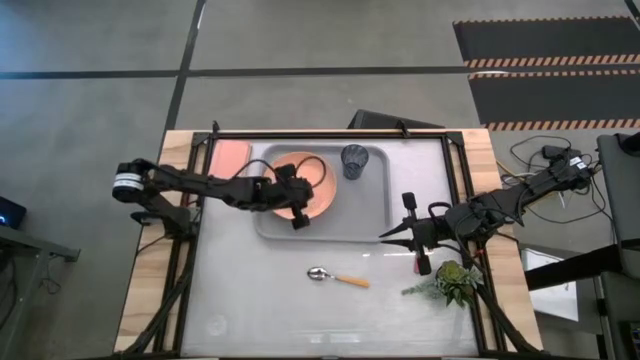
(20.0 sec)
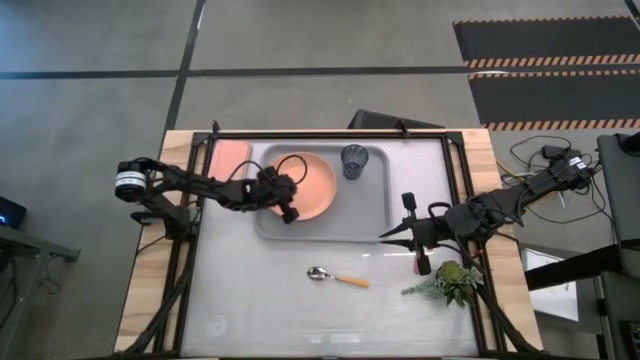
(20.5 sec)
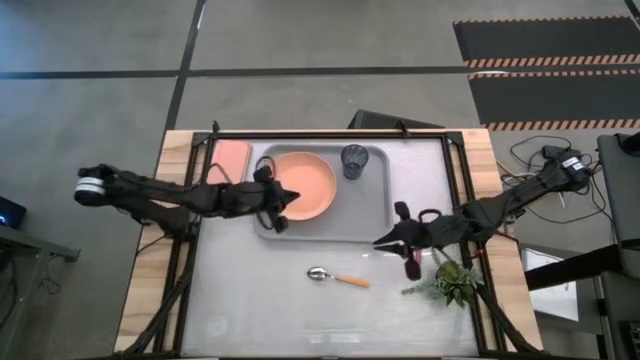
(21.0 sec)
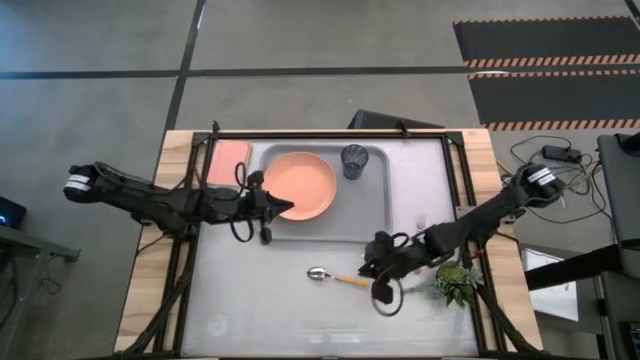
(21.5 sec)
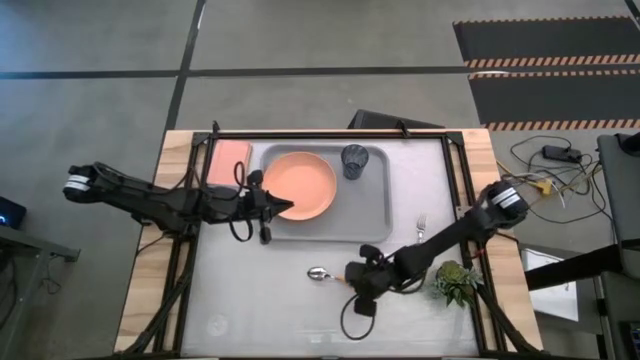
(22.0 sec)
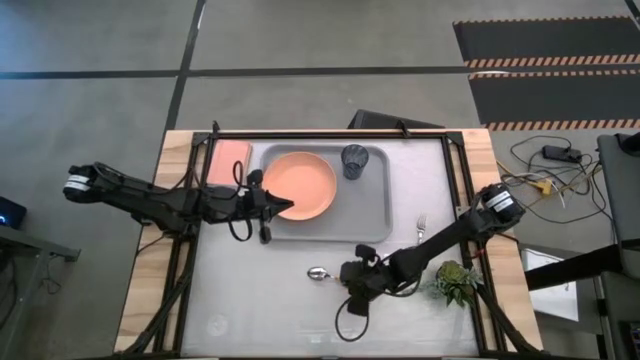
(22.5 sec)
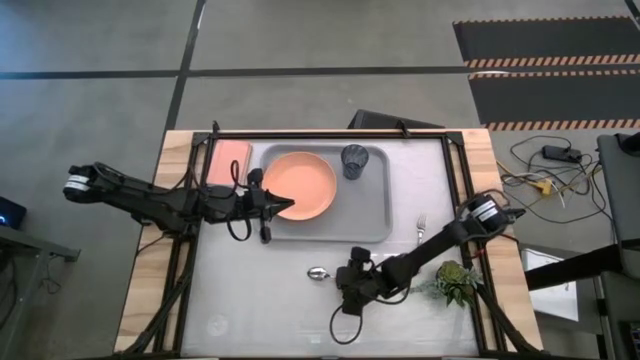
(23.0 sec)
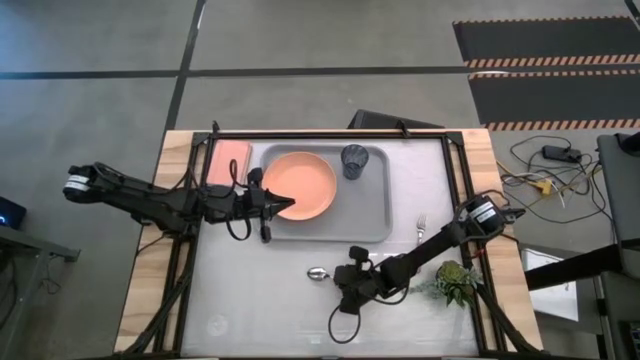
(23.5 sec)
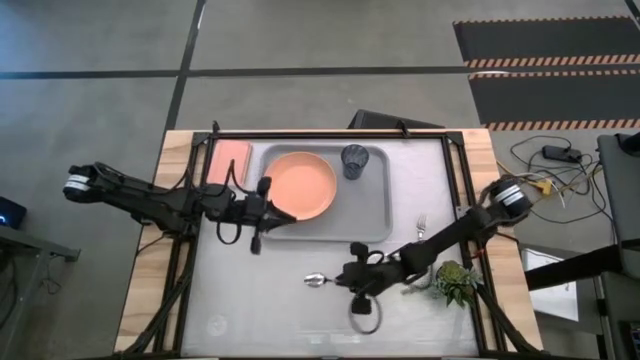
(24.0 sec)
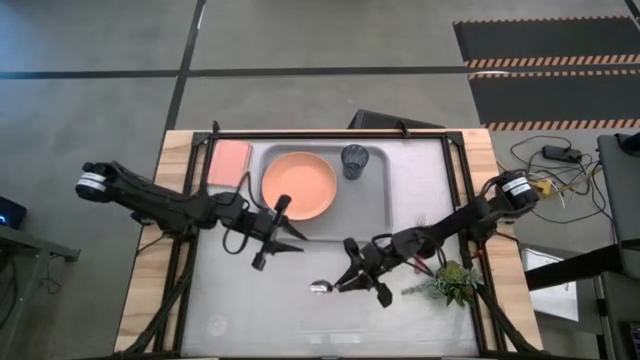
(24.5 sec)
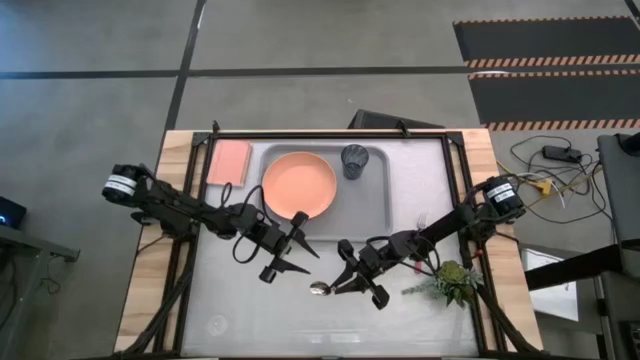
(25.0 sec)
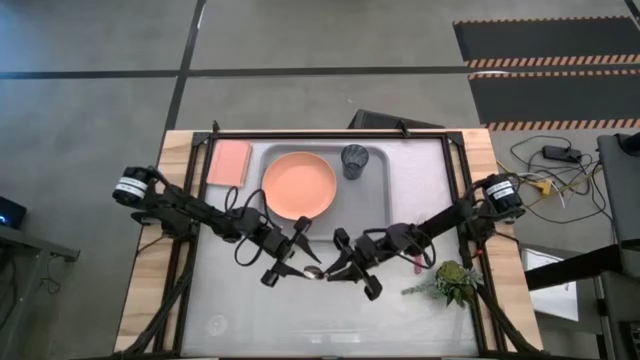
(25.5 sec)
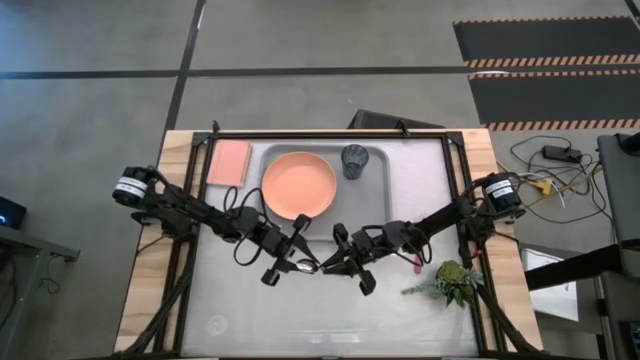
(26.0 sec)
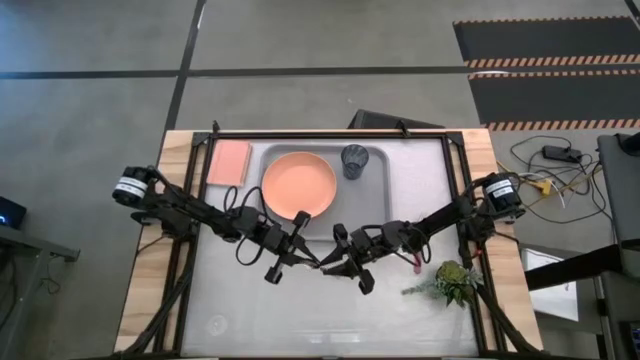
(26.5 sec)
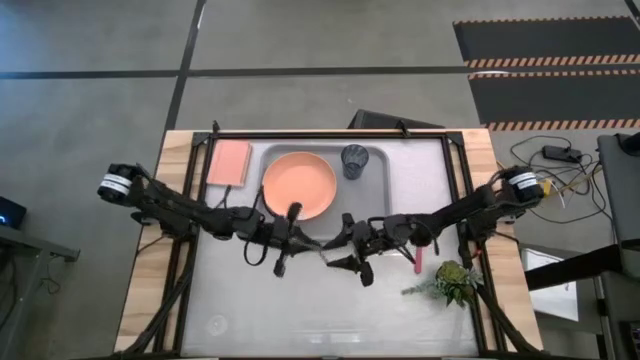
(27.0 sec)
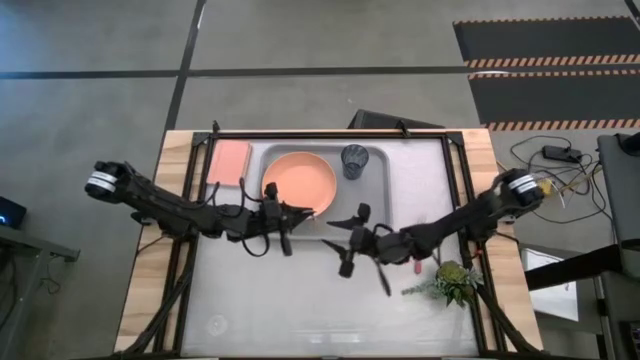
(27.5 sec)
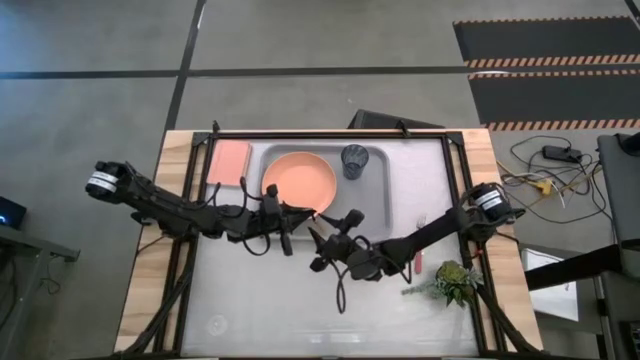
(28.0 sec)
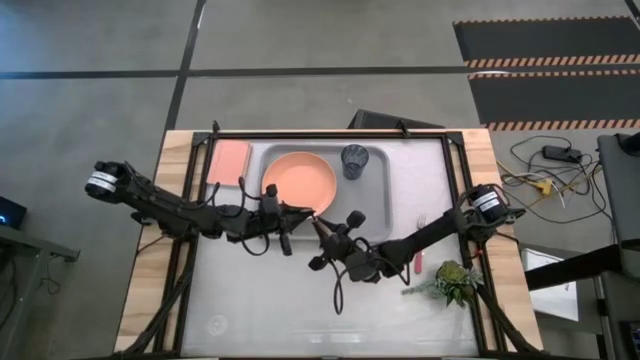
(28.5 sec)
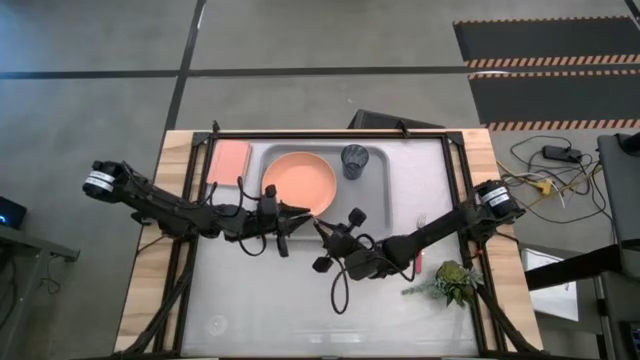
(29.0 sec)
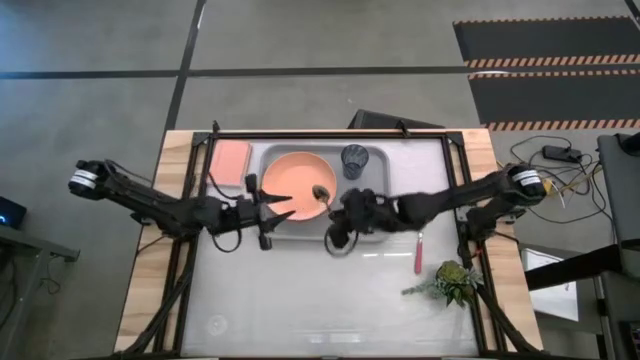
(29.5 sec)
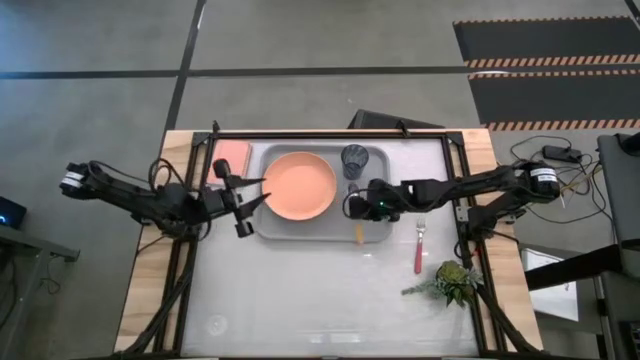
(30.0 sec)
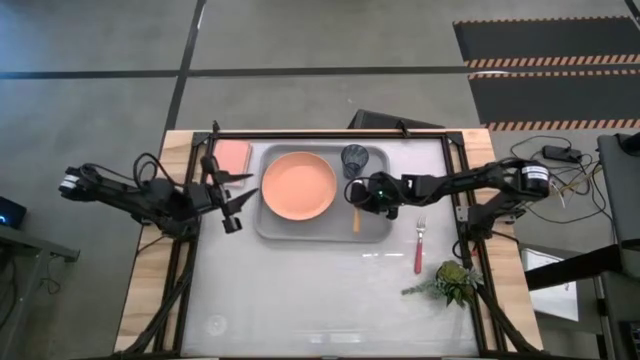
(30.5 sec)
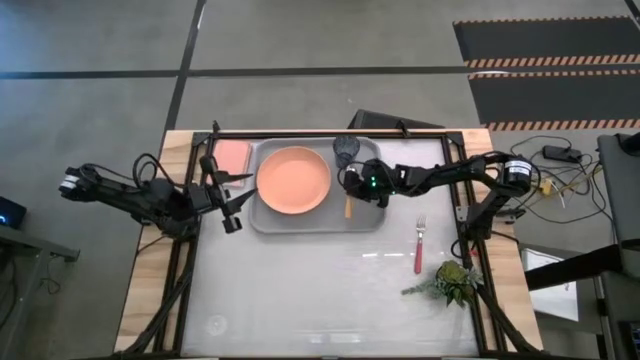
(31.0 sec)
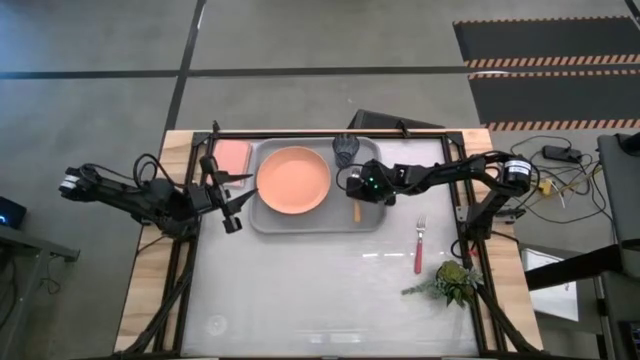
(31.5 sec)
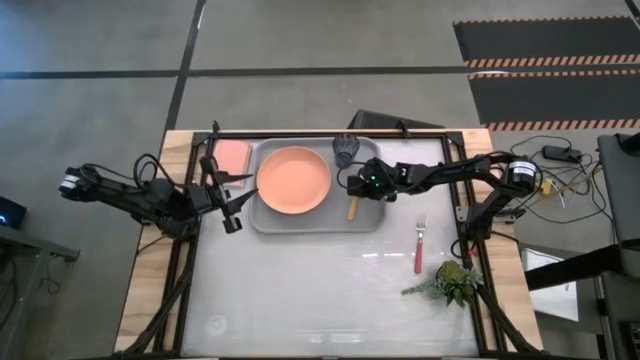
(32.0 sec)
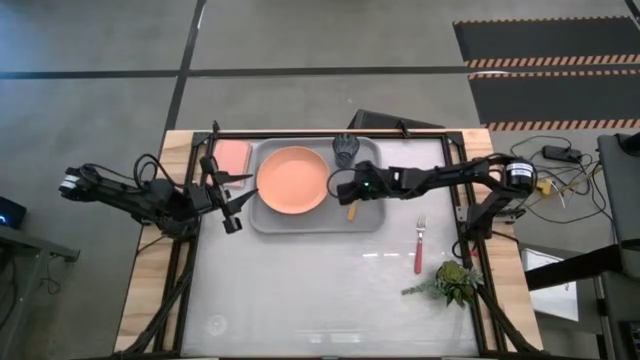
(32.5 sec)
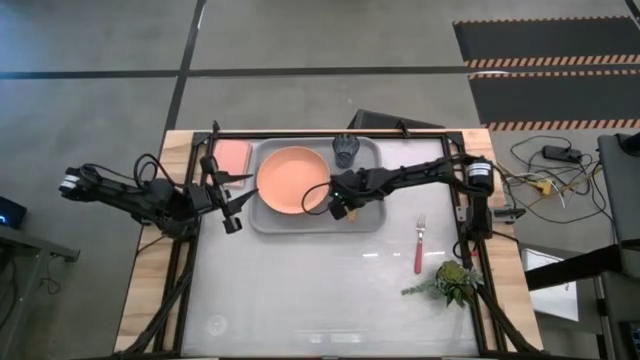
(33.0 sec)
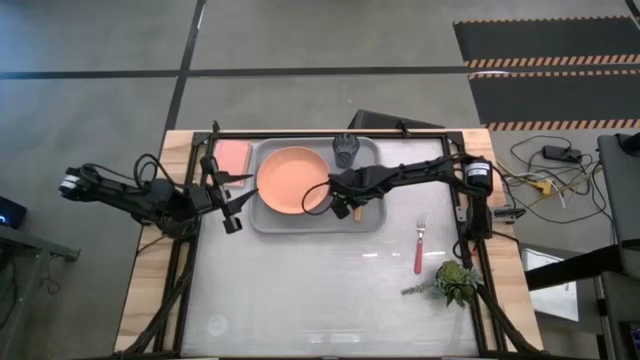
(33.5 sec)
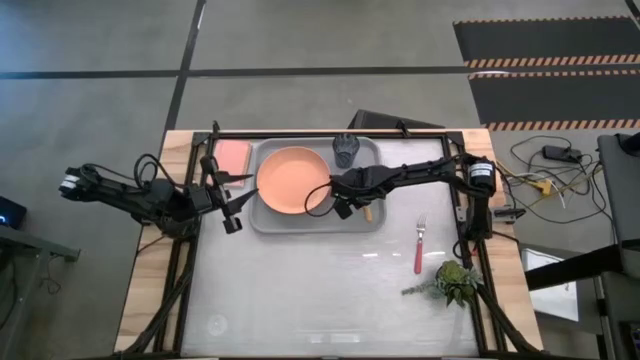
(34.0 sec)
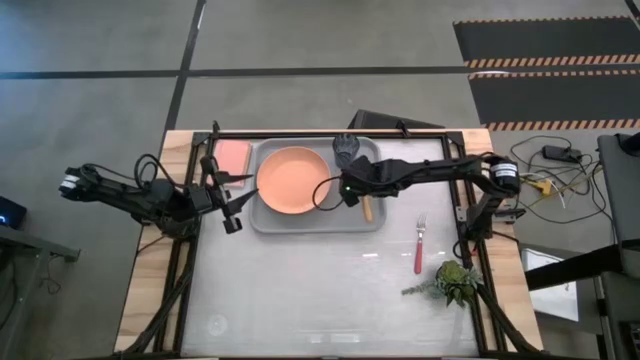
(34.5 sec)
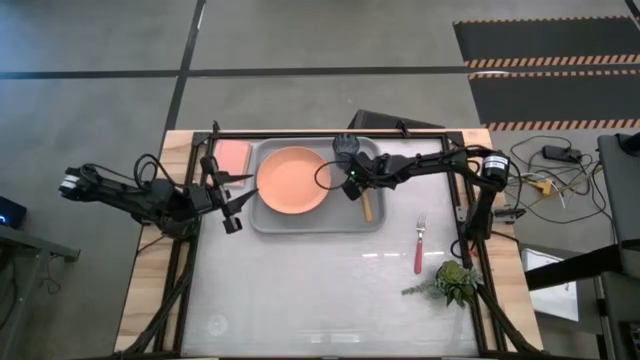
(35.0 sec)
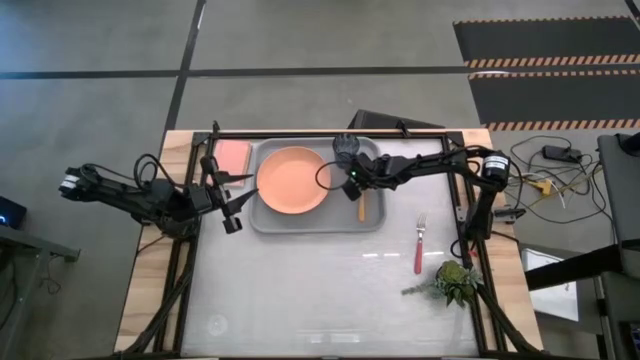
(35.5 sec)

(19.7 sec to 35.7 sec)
Task: Pick and place plate/cup/fork/spoon on tray
Put the yellow spoon on the gray tray to the right side of the orange plate

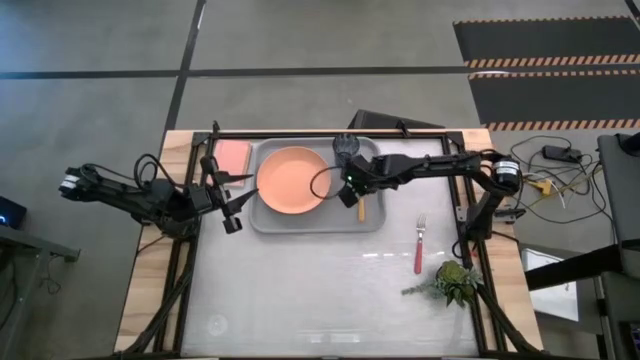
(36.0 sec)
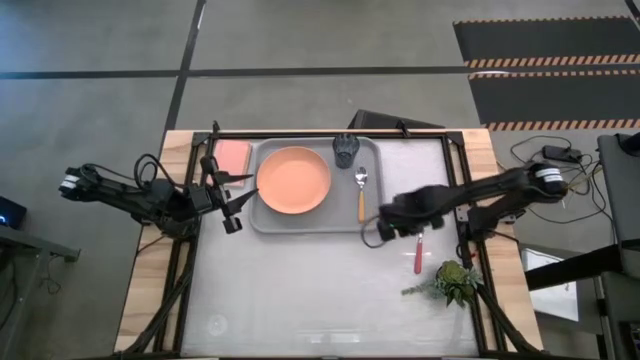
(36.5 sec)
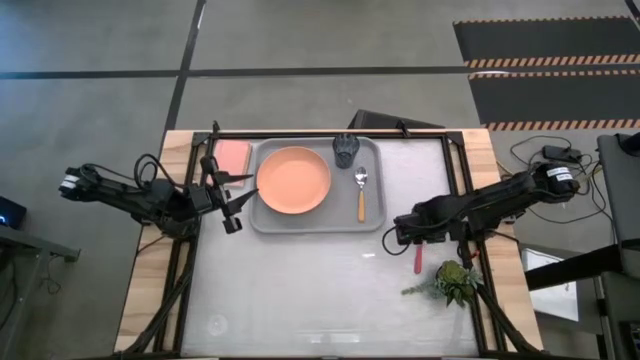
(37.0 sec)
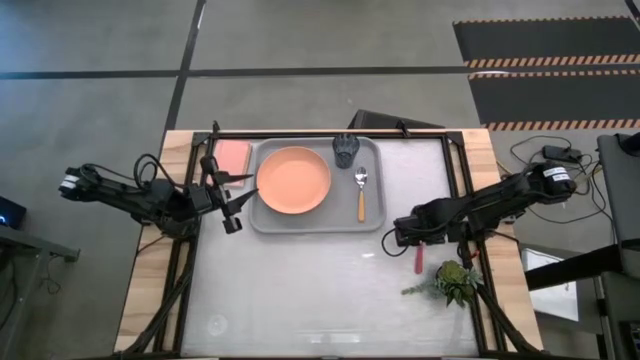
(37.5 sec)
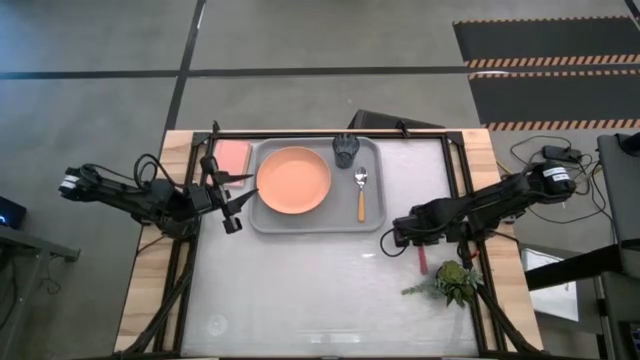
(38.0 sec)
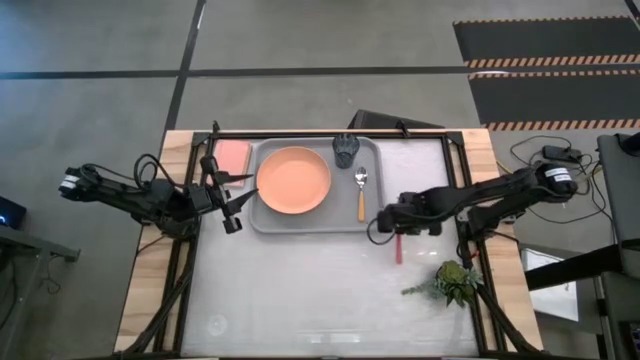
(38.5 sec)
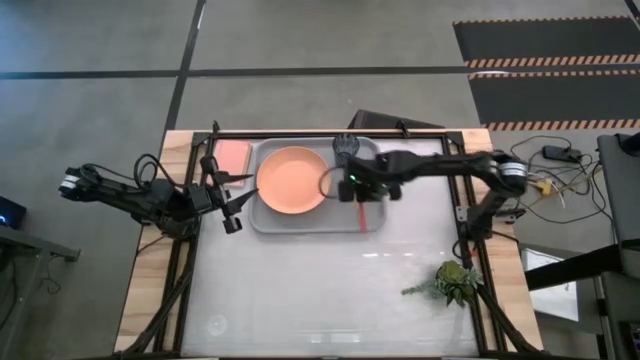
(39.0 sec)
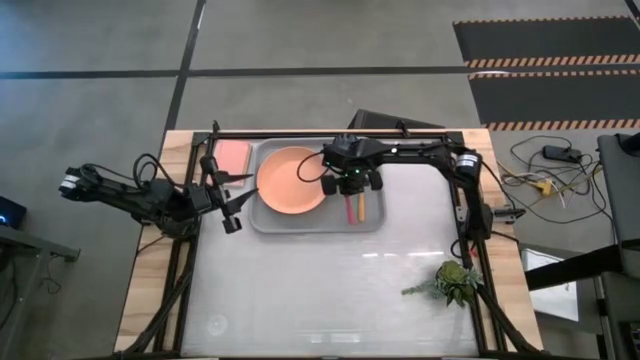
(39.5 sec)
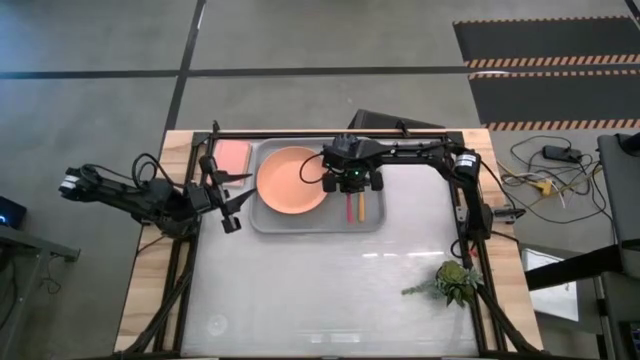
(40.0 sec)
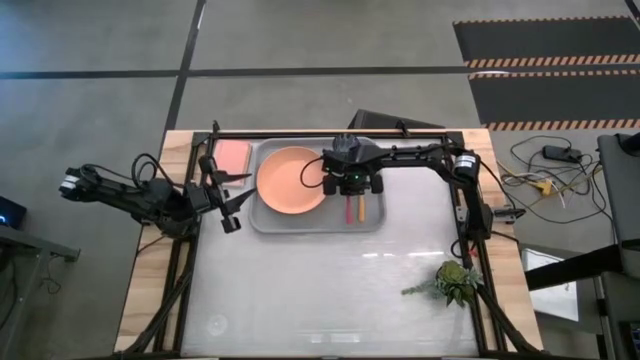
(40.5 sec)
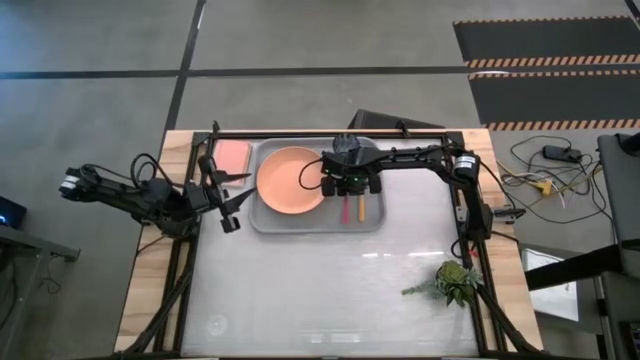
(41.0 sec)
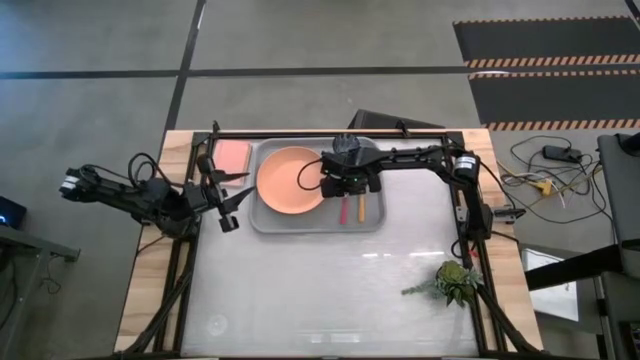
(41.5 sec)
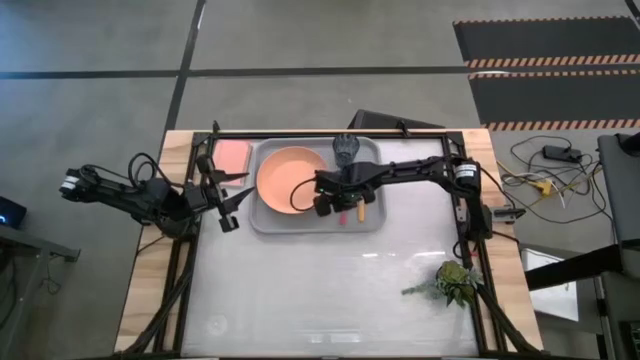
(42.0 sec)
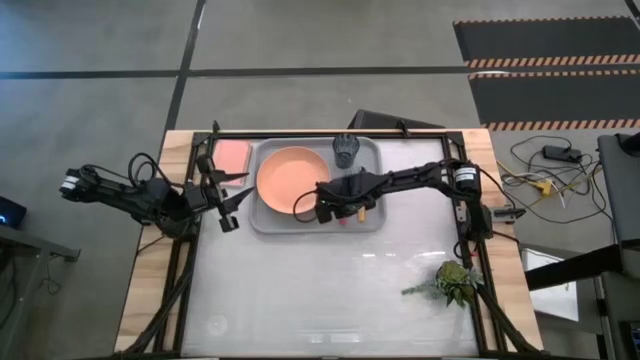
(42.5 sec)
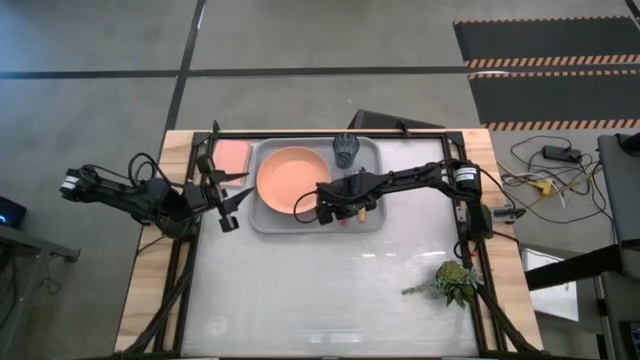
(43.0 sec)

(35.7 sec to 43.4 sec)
Put the red fork on the gray tray to the bottom side of the cup
